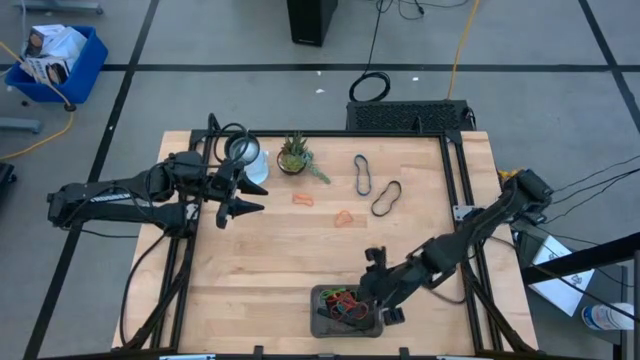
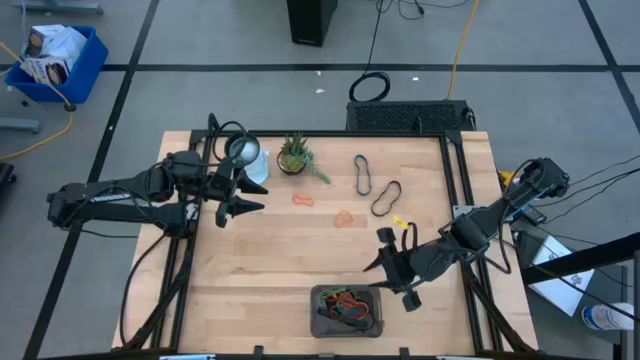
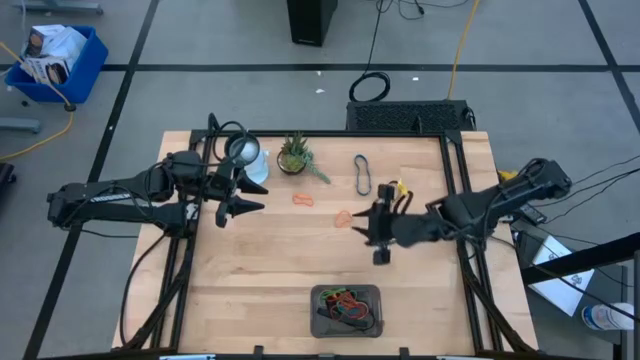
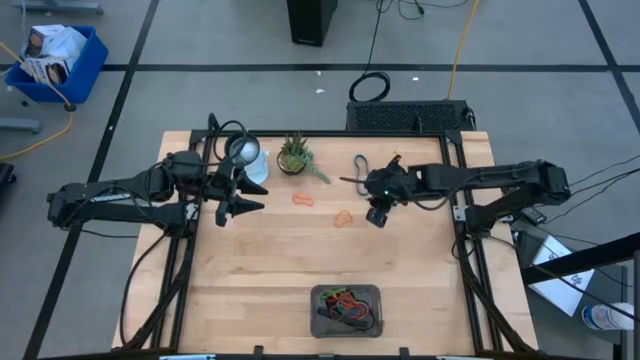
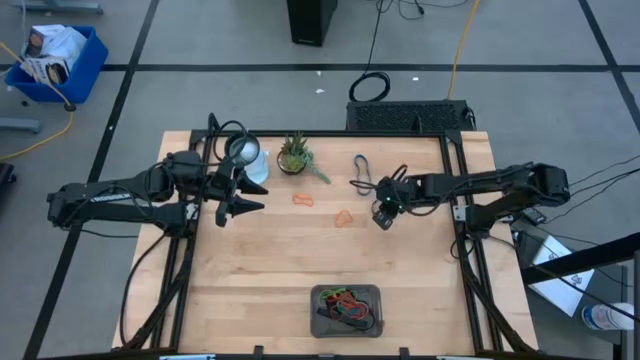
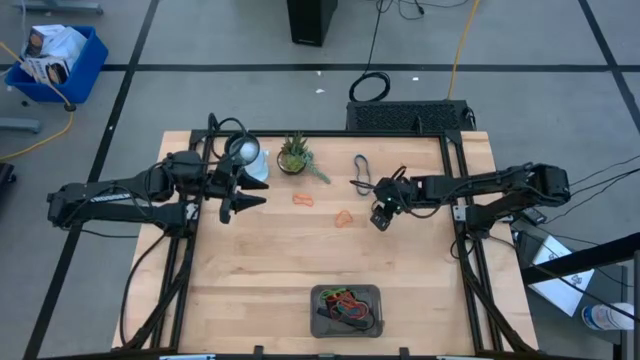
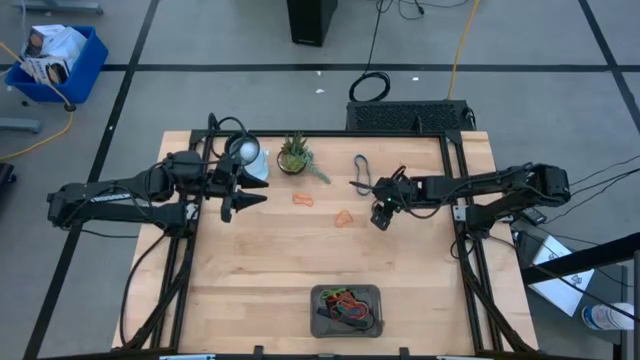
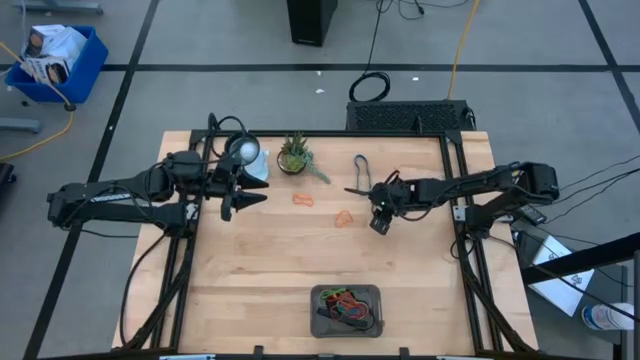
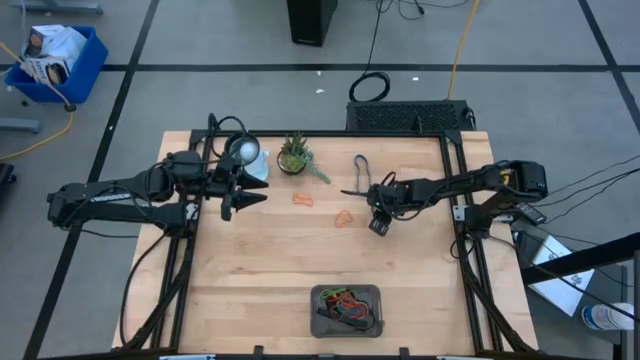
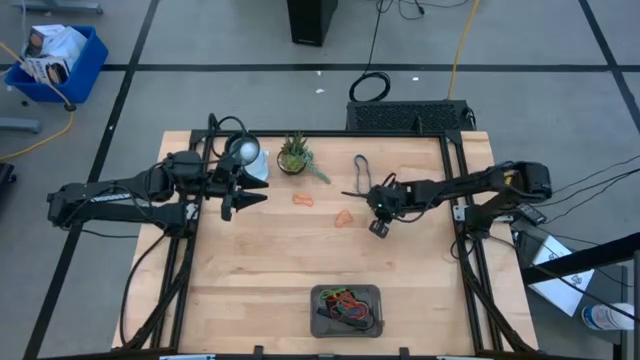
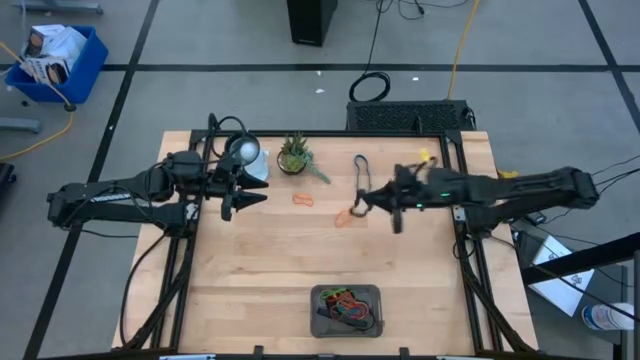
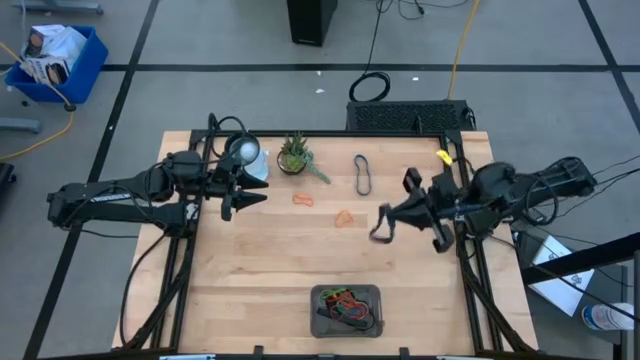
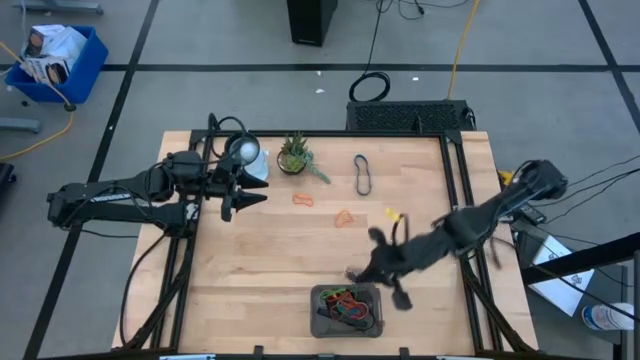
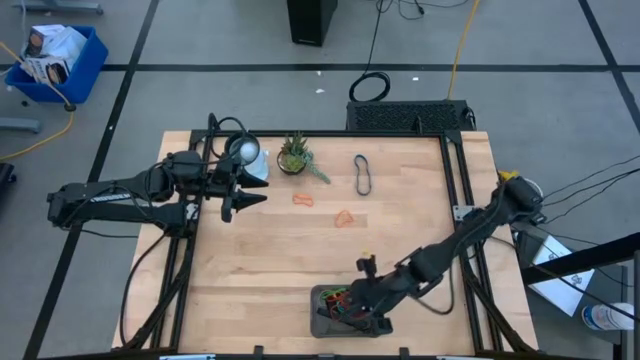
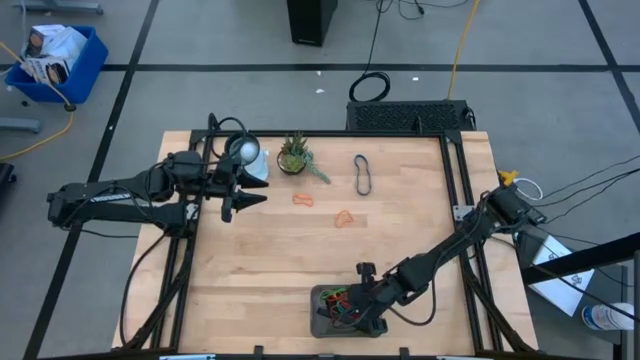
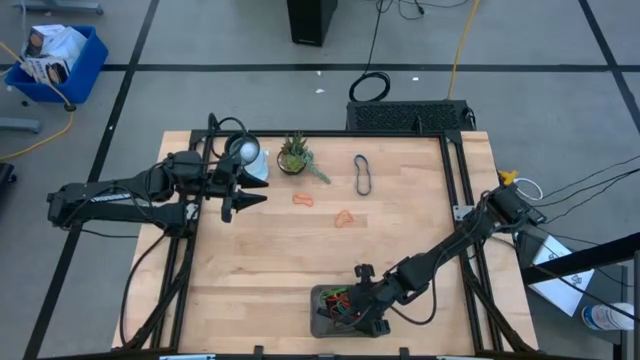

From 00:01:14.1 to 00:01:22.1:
Task: Pick and place rubber bands into bin
Put the black rubber band into the black transparent bin

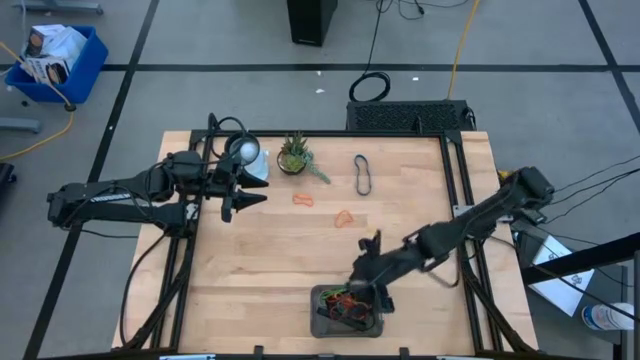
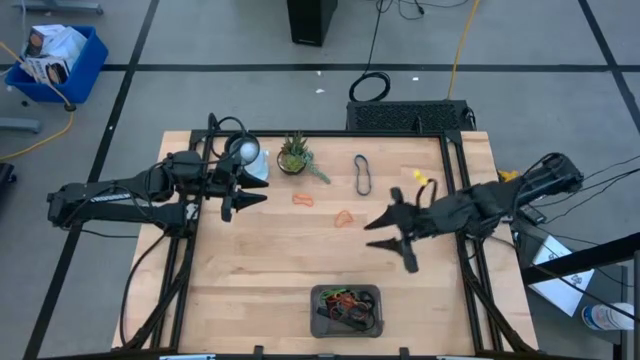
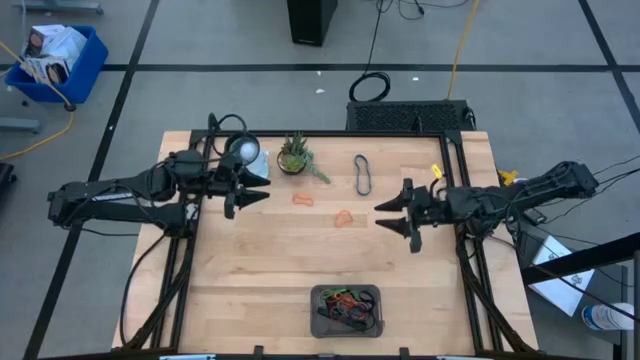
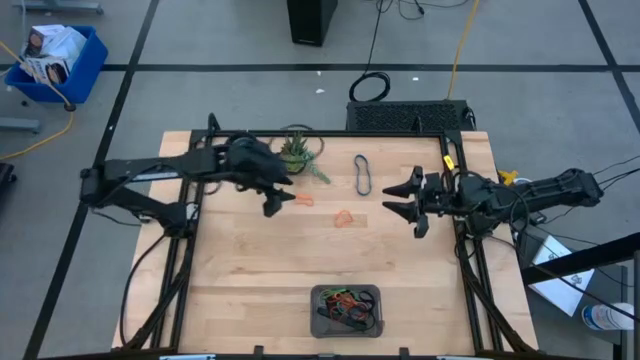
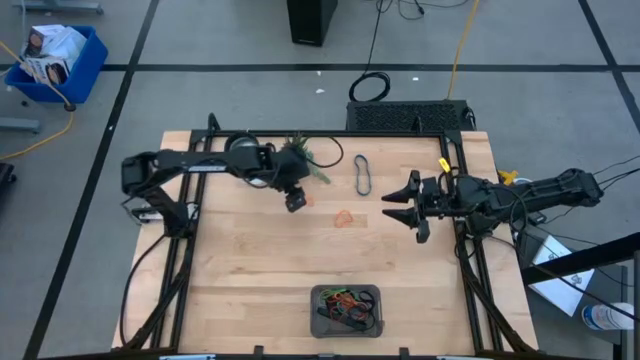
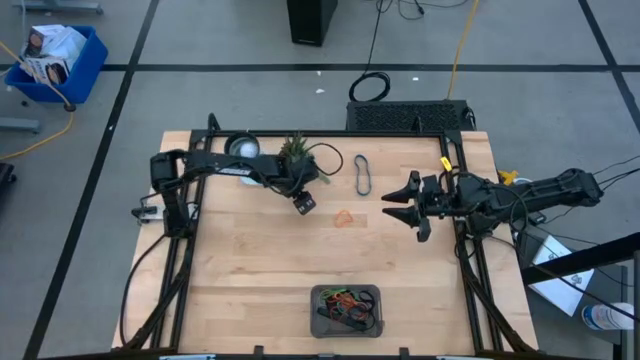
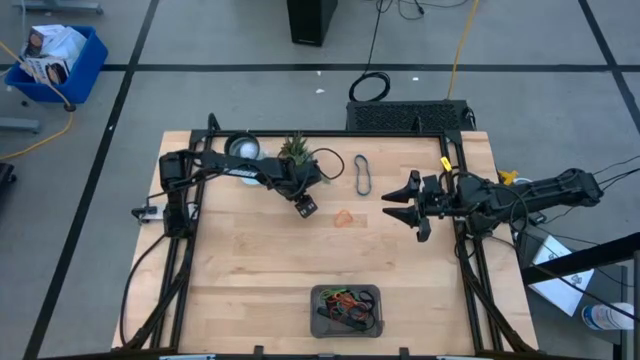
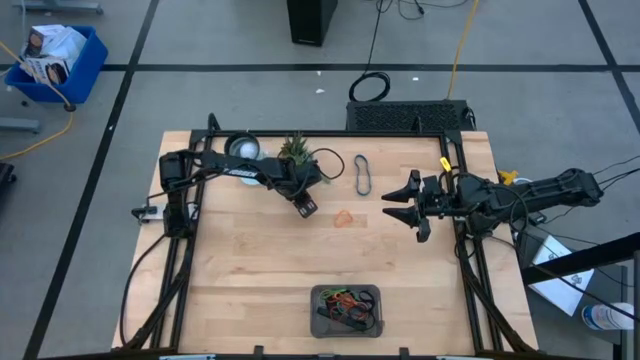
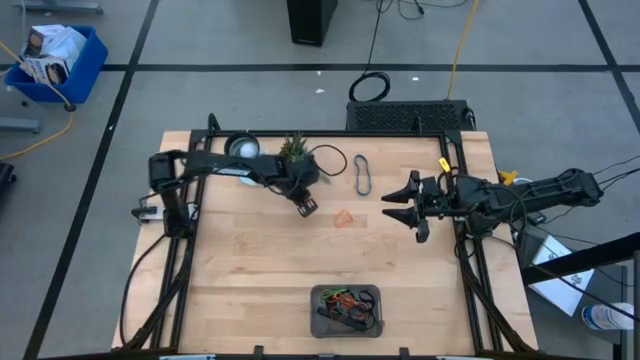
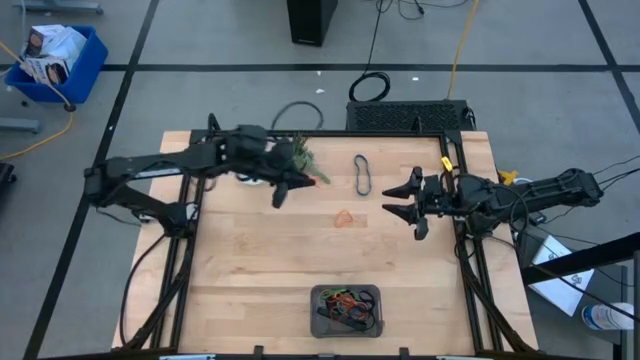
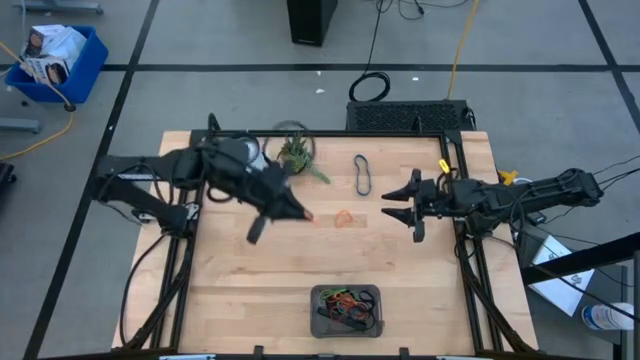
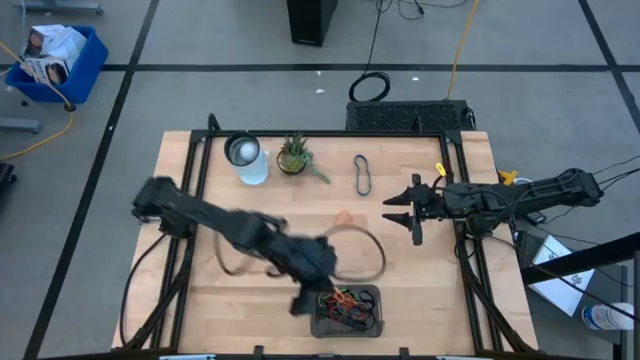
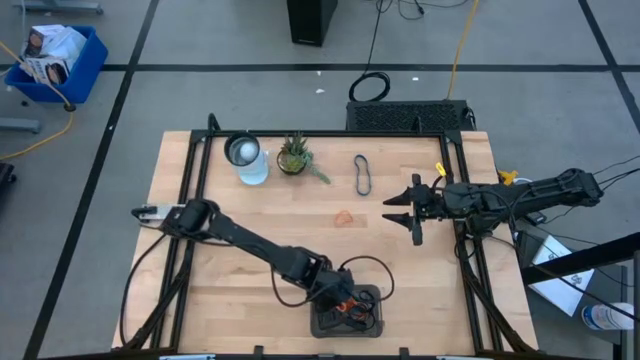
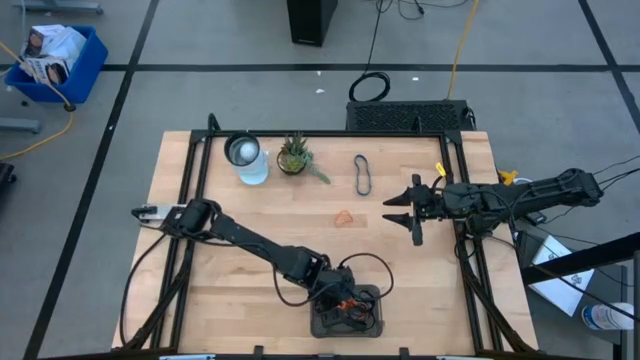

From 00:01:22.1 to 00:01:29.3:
Put the orange rubber band into the black transparent bin

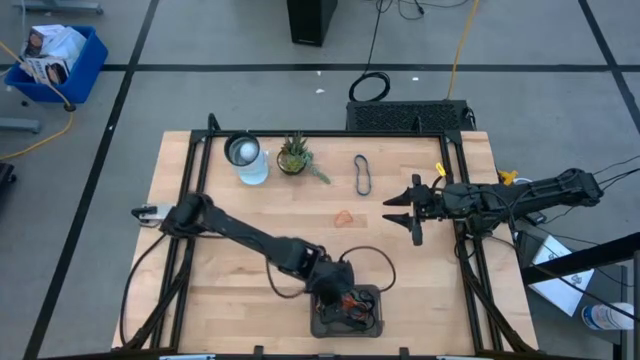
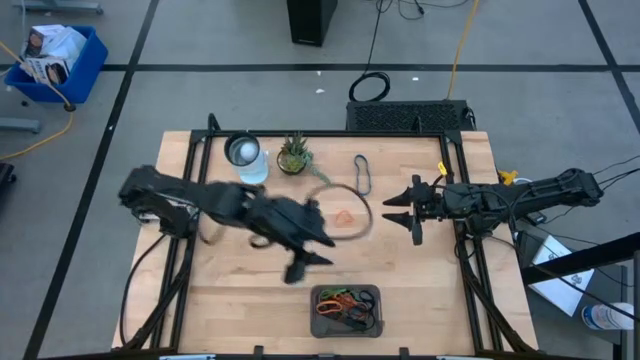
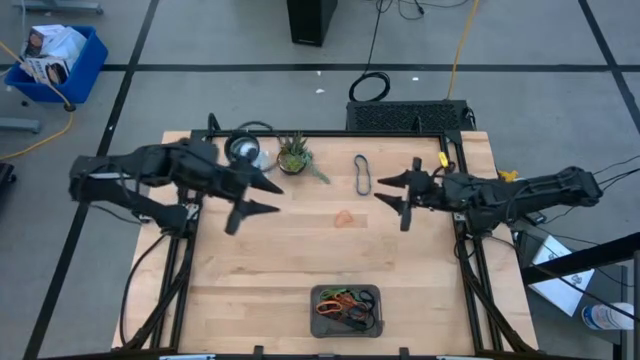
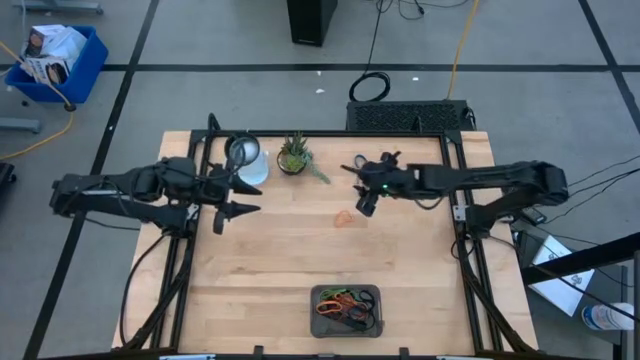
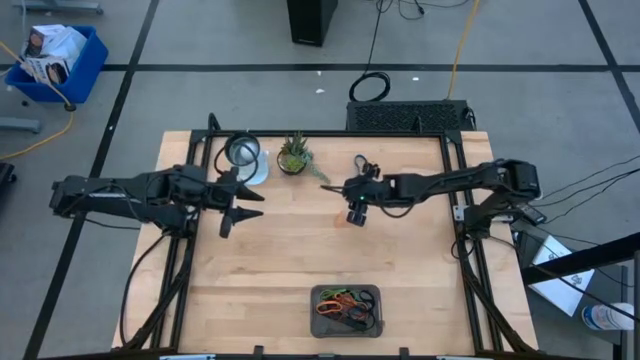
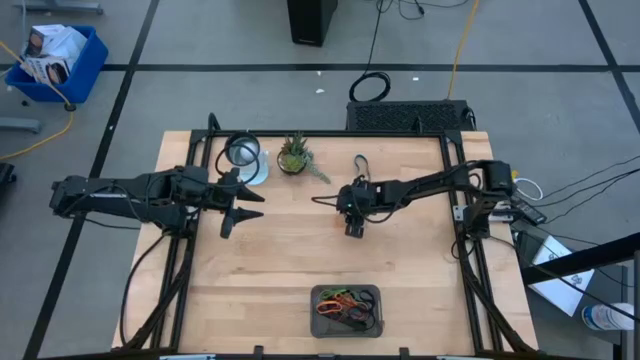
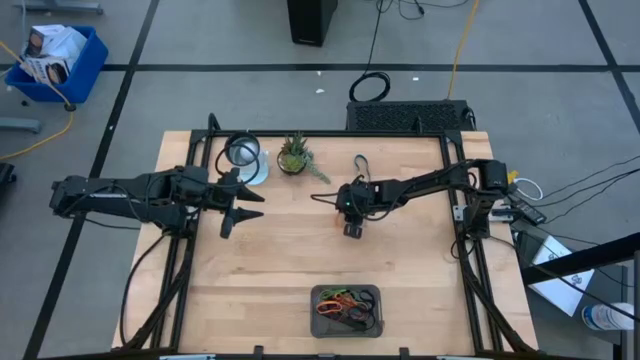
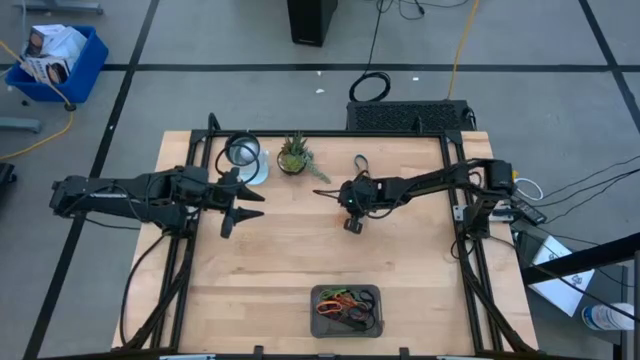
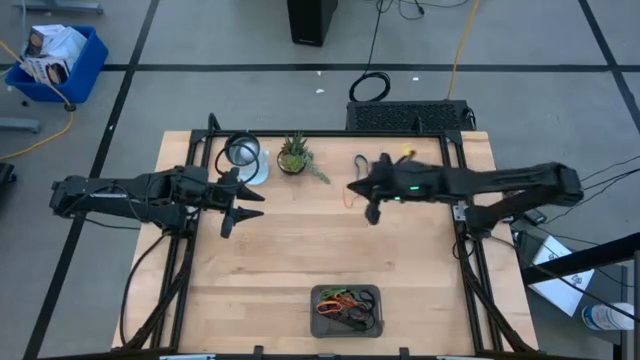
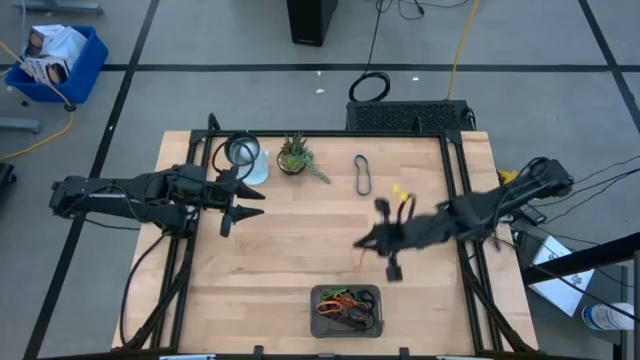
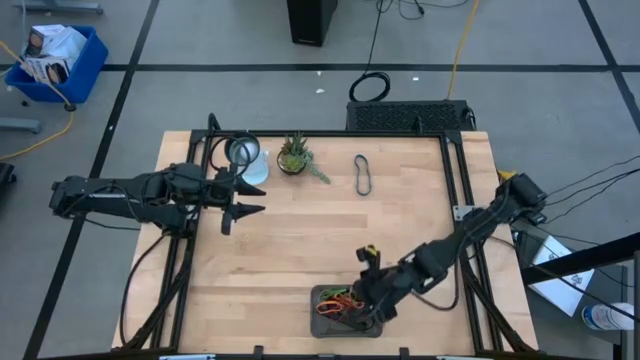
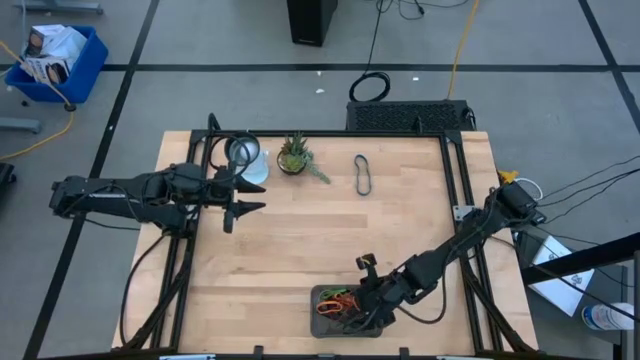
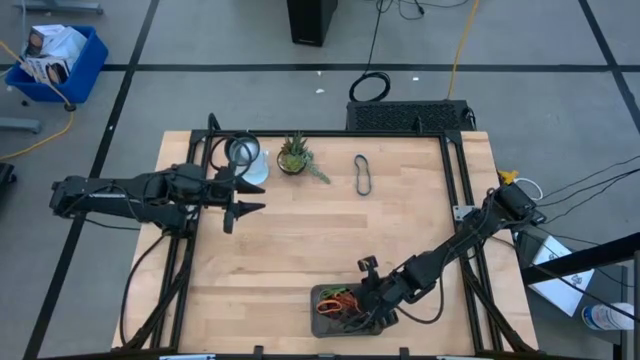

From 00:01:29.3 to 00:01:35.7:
Put the orange rubber band into the black transparent bin

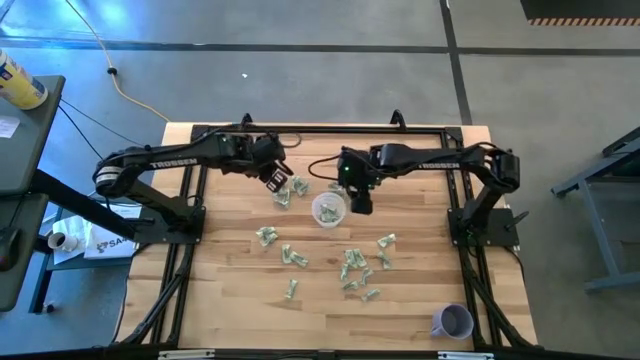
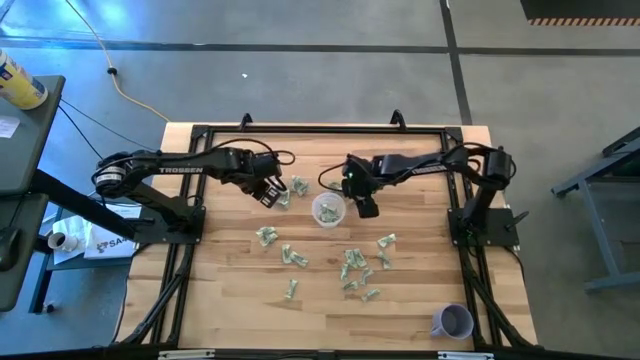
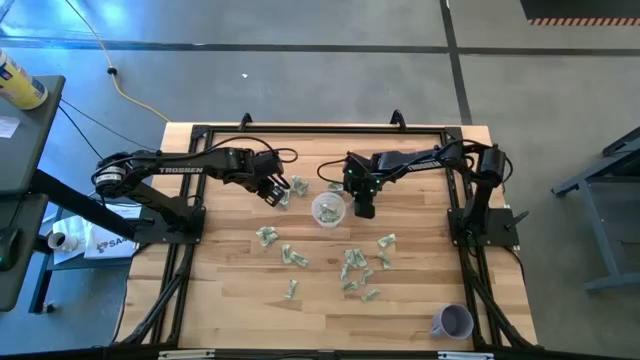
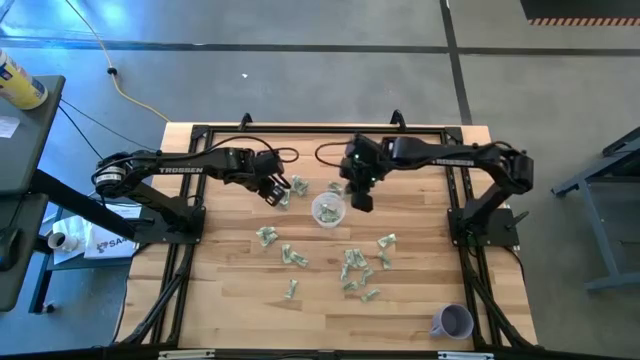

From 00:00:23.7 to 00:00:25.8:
Task: Pick and place Stevia / Truvia into bins
Put the white stevia packet into the transparent container
